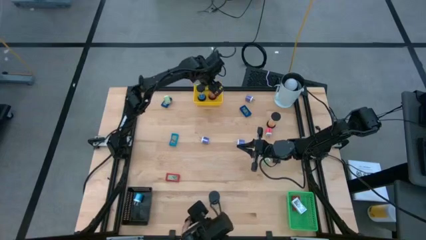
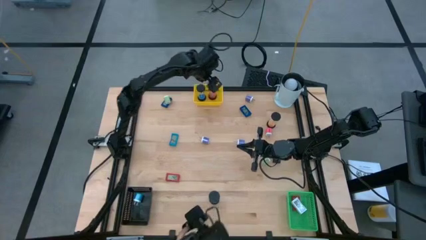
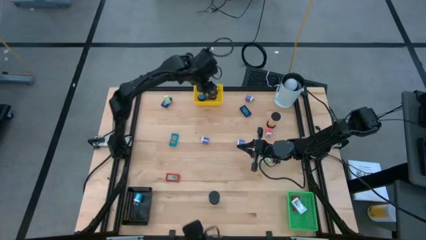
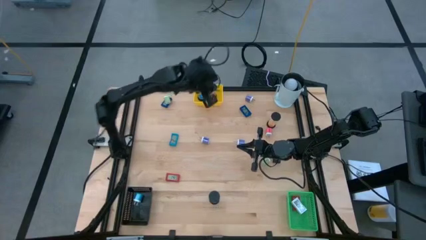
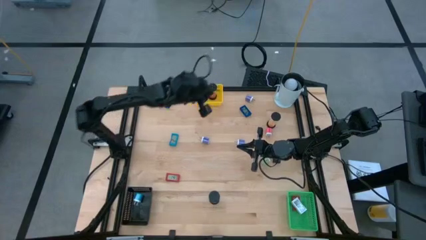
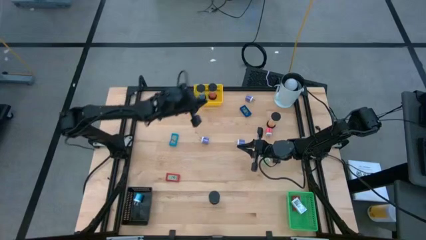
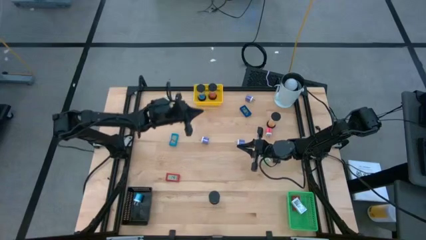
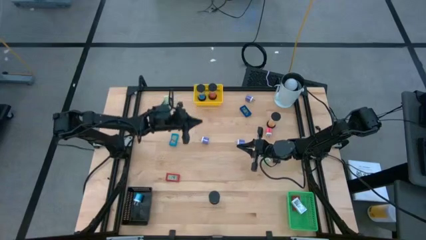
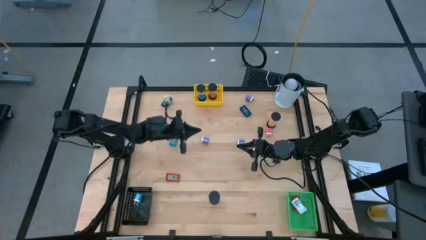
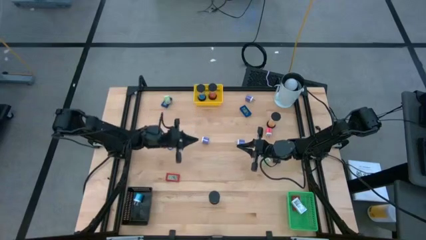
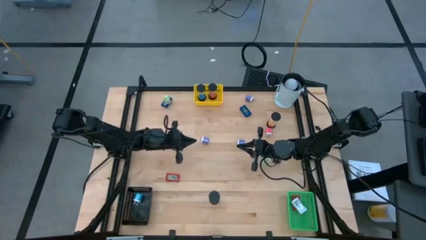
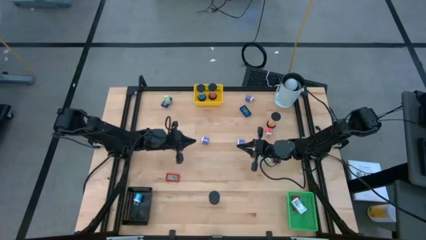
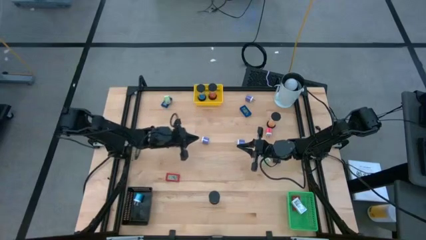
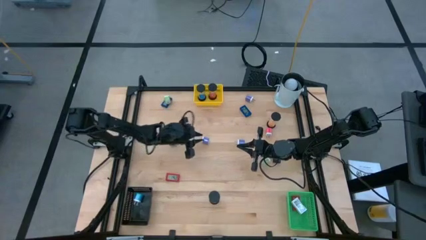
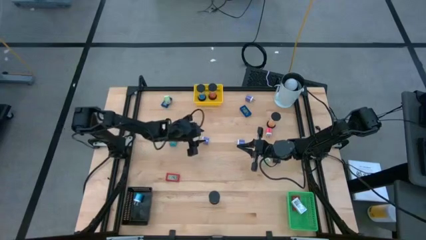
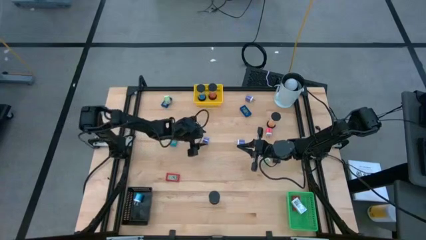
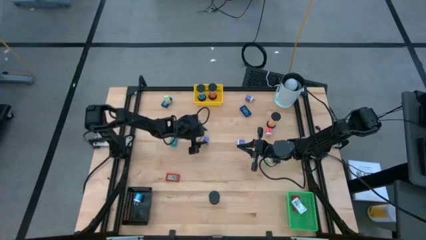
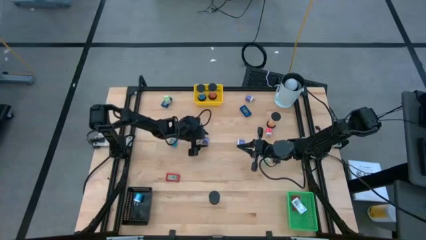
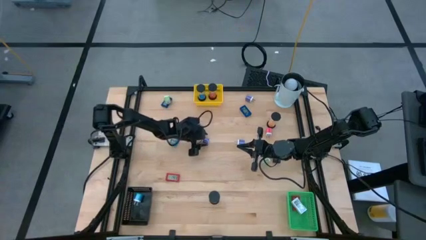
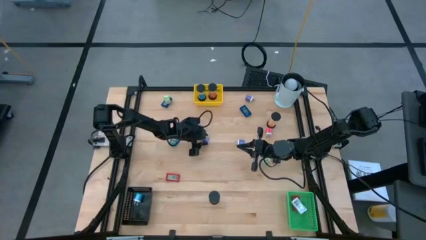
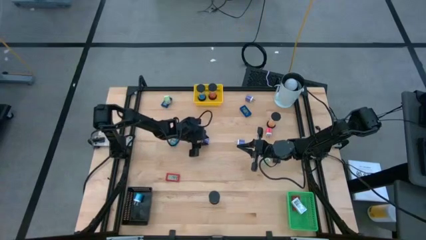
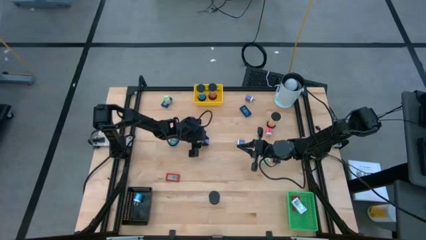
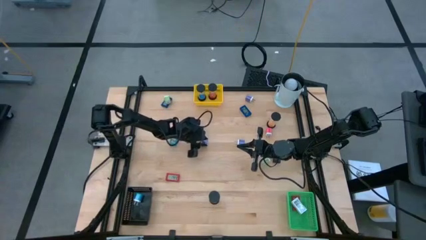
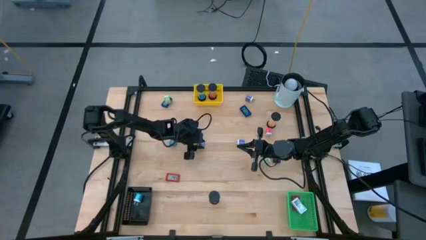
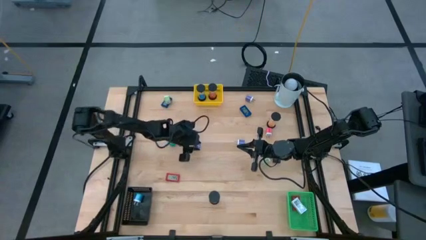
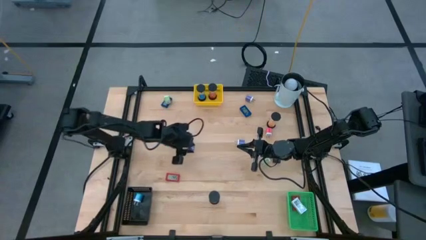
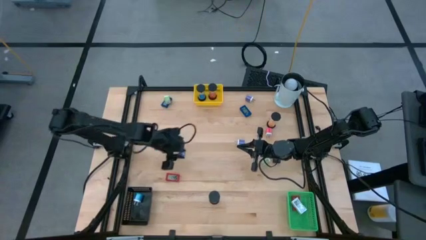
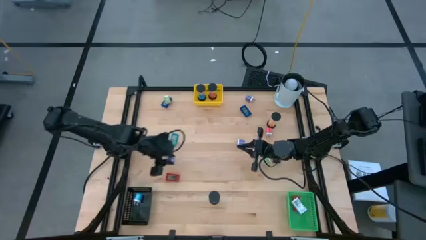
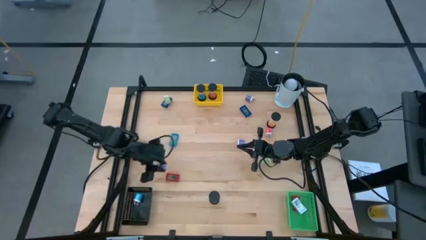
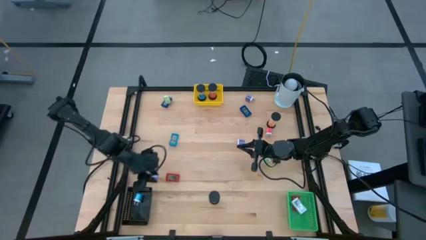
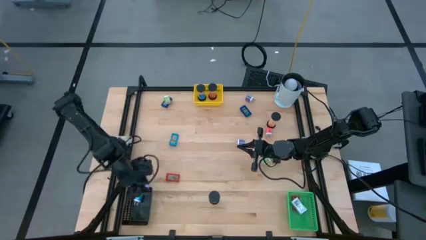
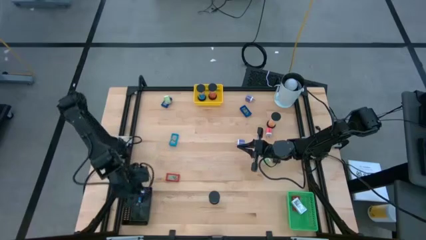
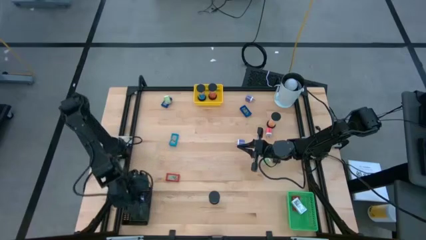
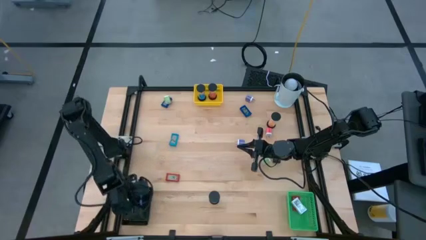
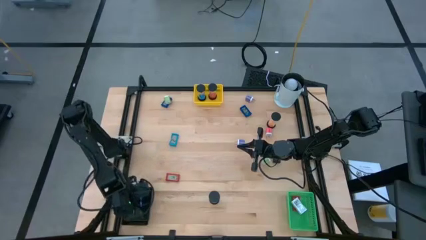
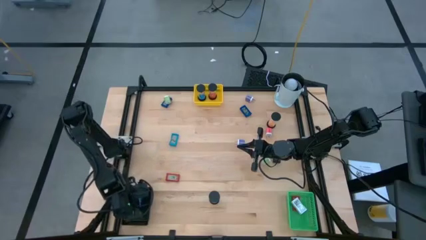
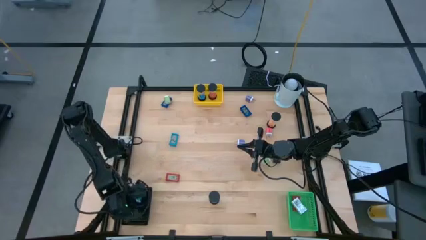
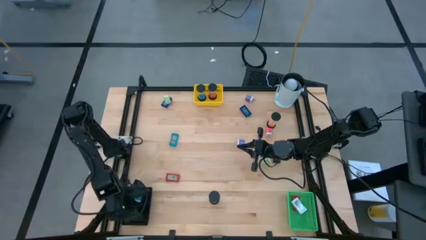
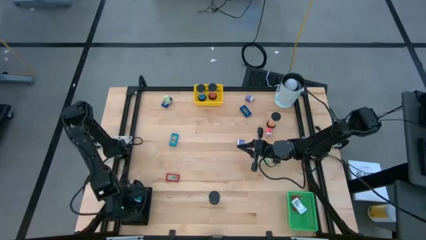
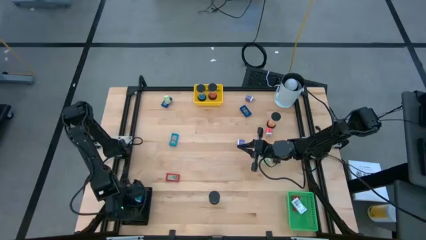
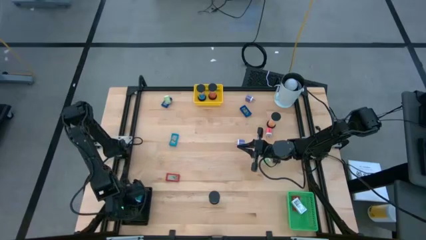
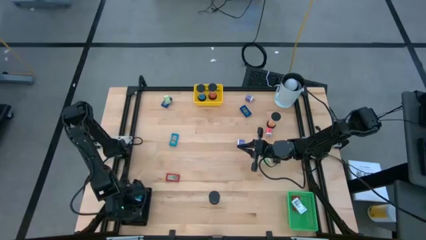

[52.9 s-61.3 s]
Task: Pick & Place Office items
Put the purple charger adapter into the black bin

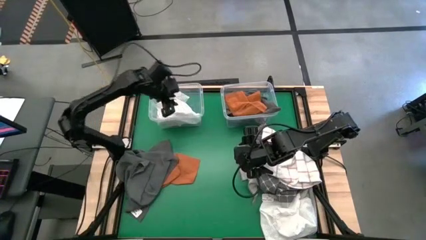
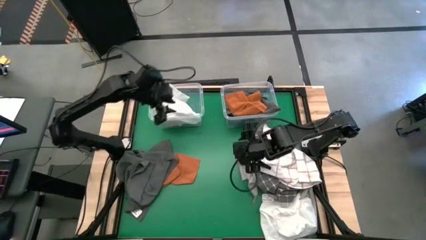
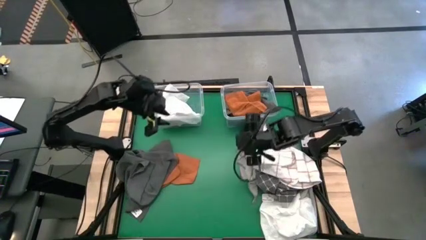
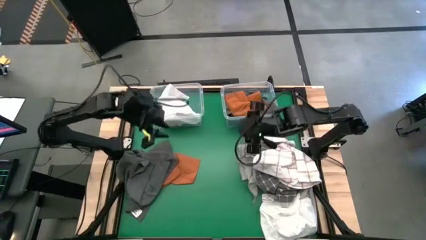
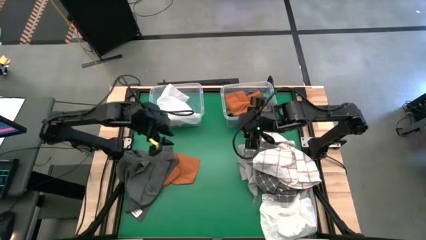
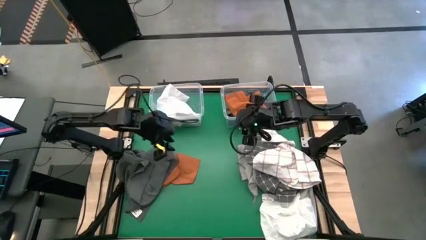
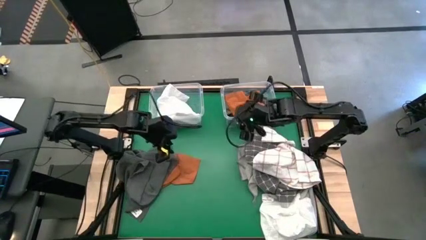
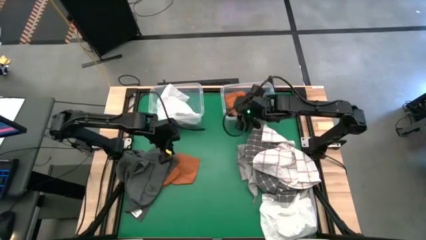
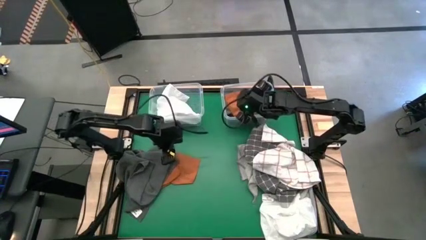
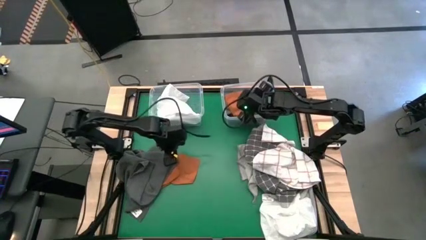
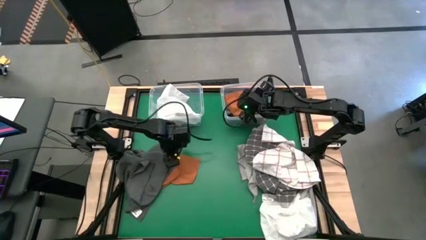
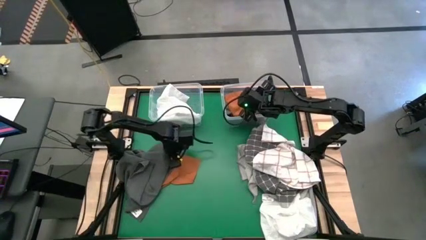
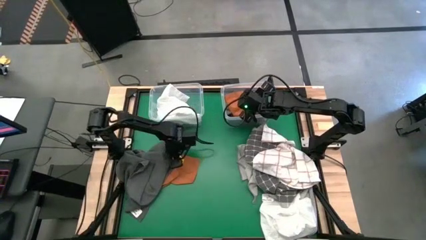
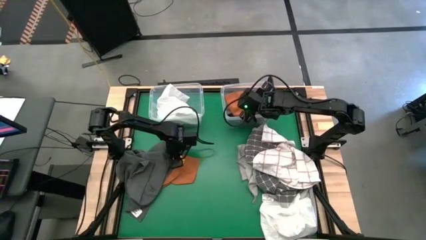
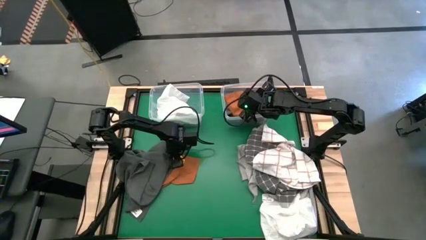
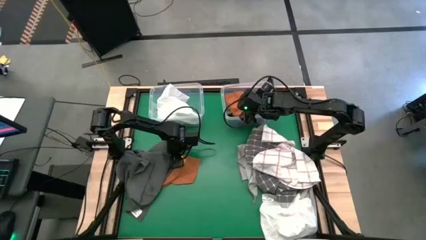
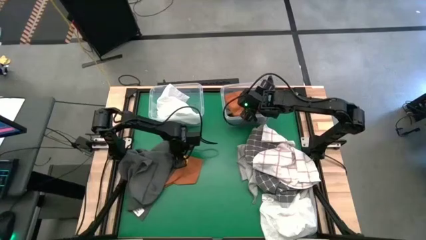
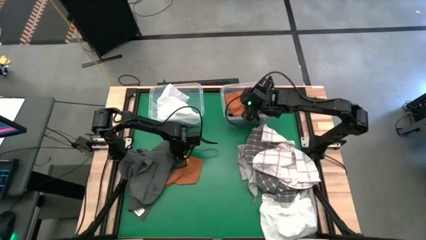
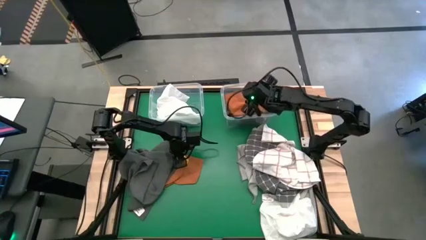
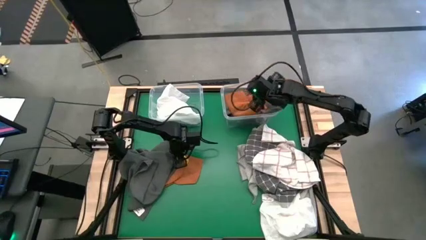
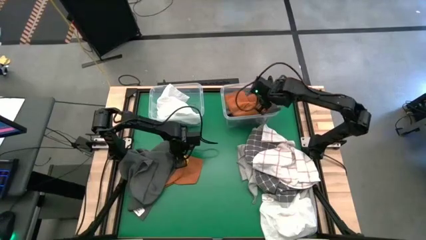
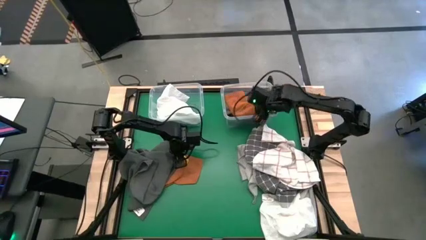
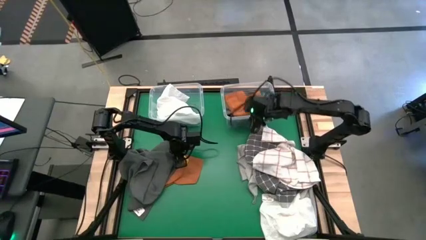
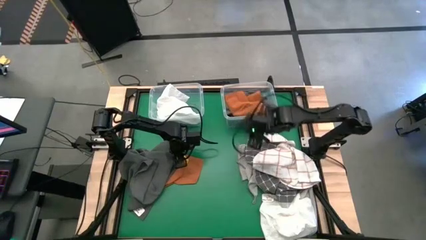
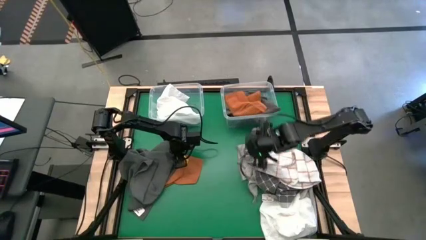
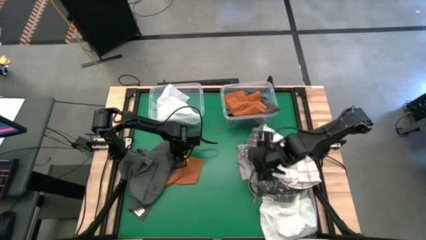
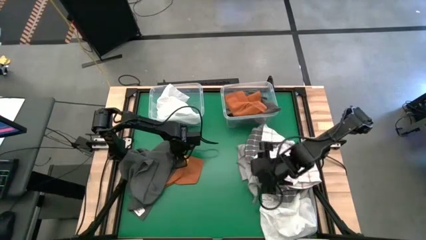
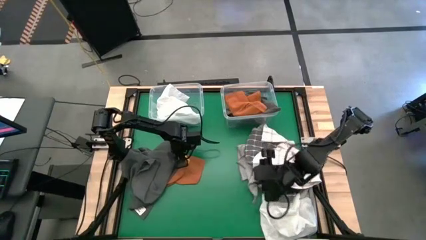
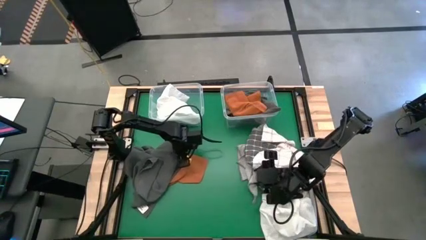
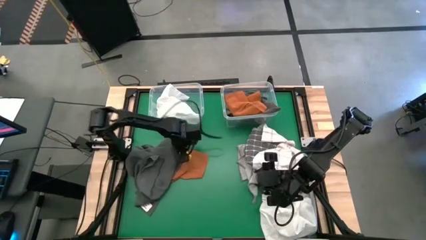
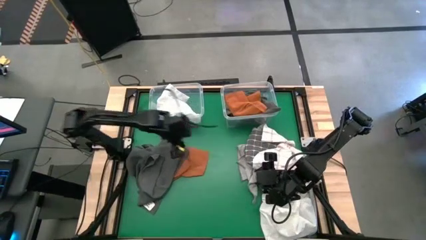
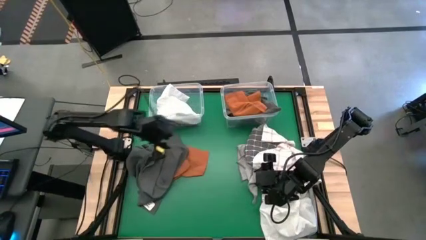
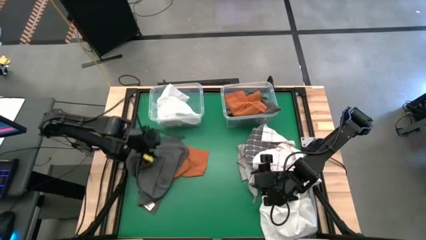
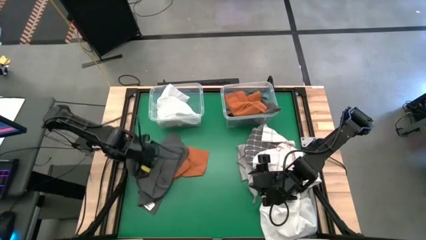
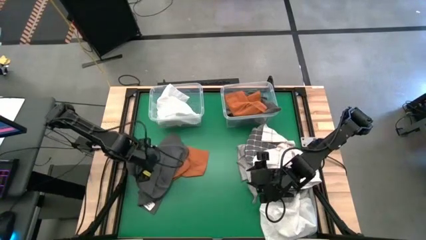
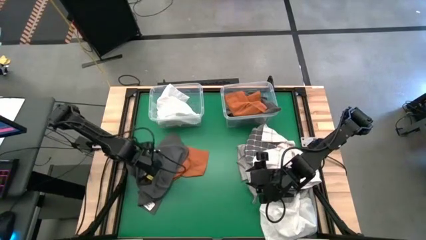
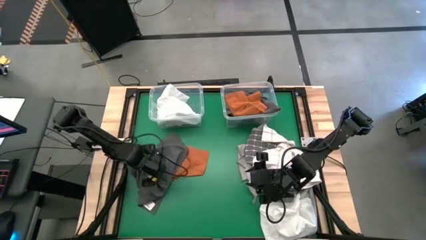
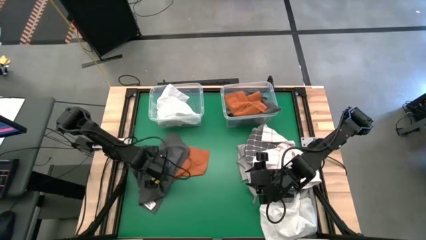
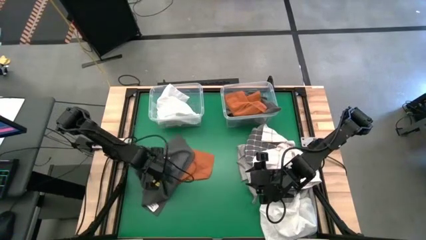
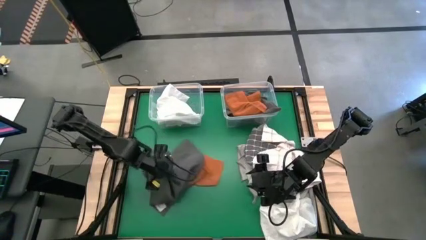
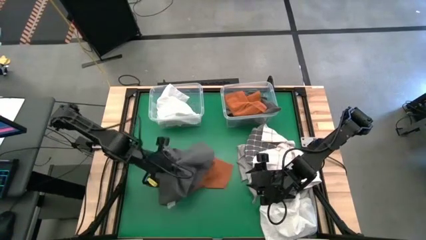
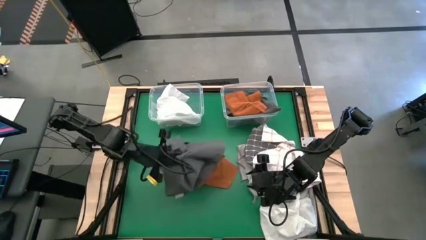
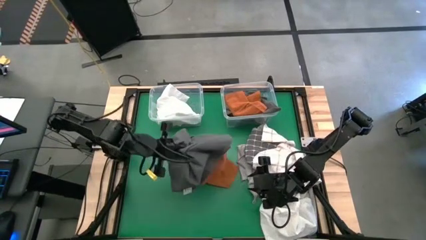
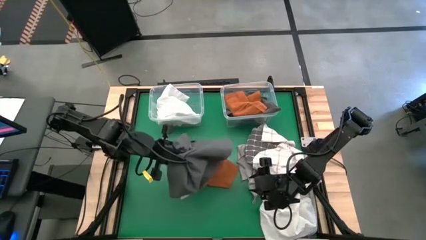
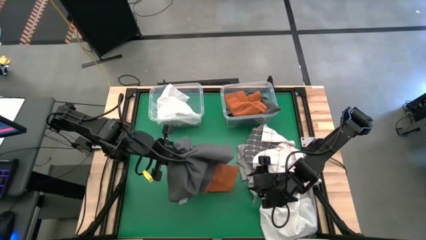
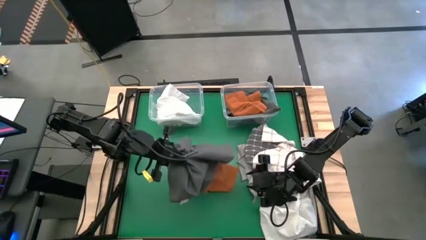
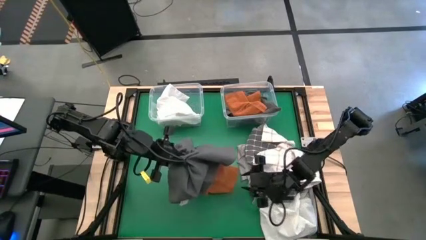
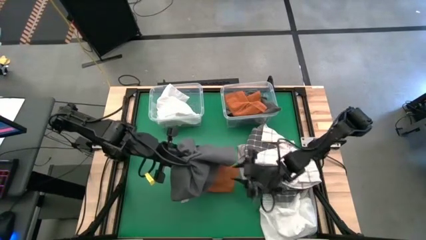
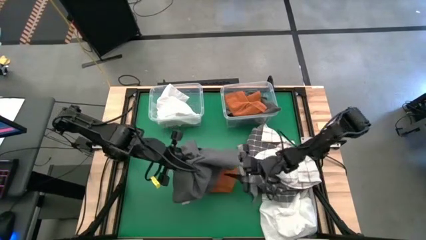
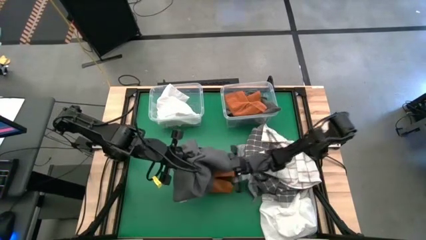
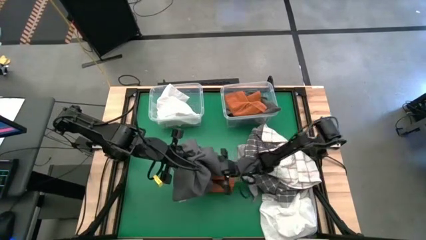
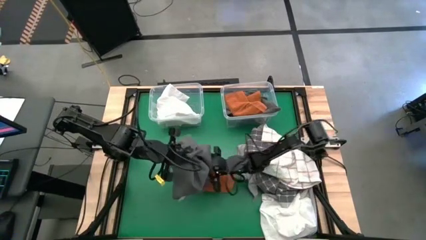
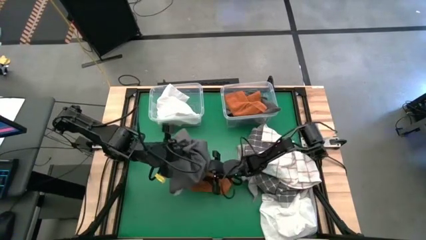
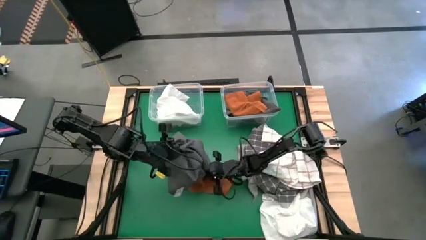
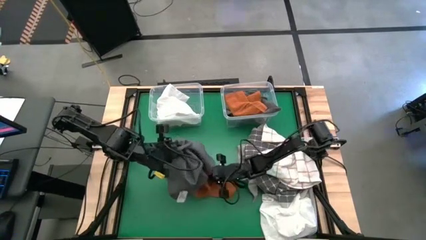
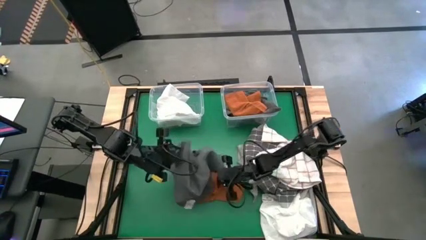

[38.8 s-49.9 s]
Task: Sort towels by color in basket
Put the orange towel into the right transparent bin
